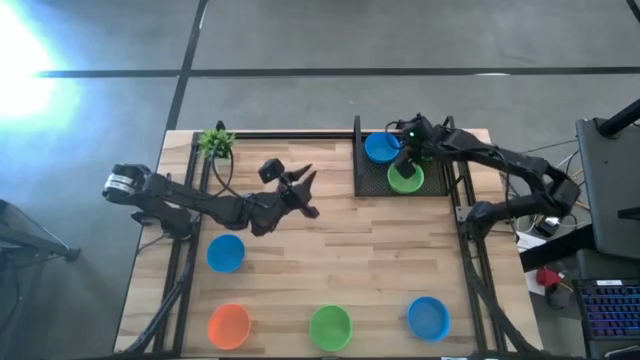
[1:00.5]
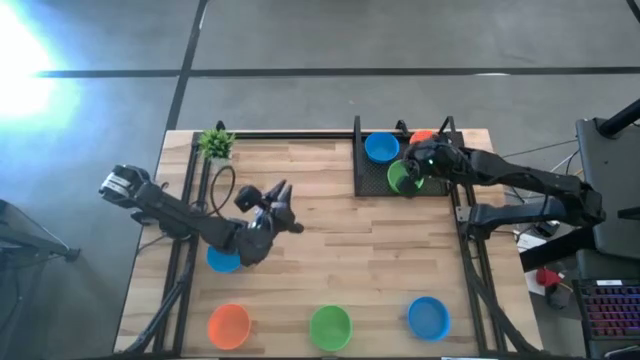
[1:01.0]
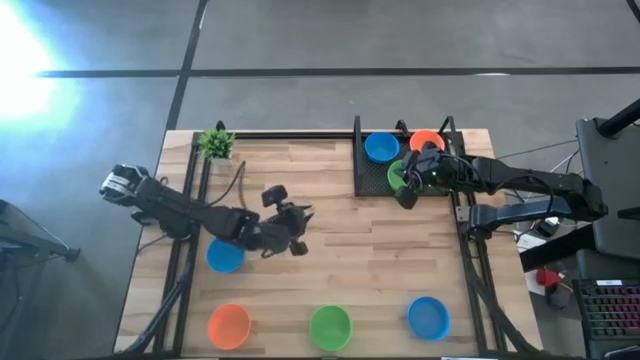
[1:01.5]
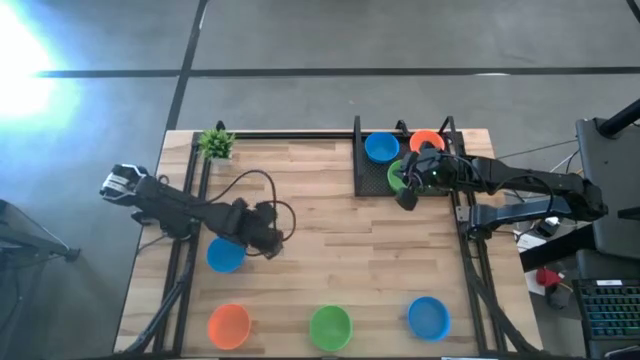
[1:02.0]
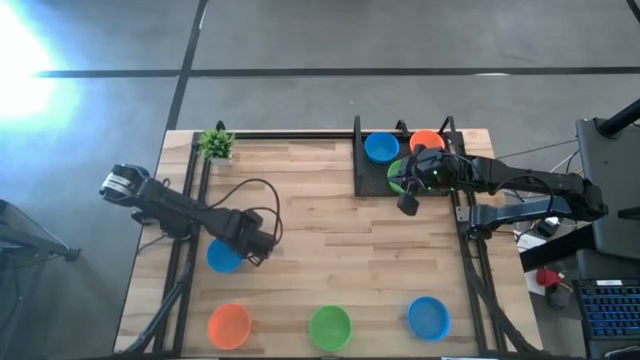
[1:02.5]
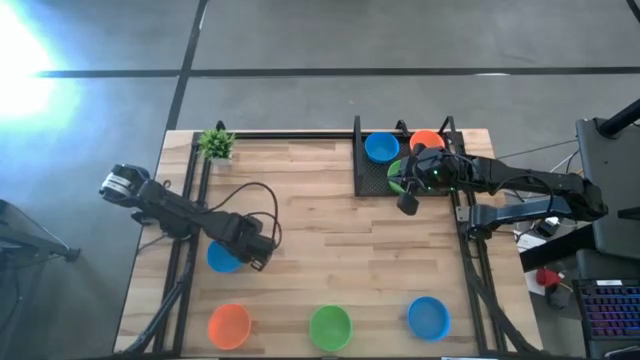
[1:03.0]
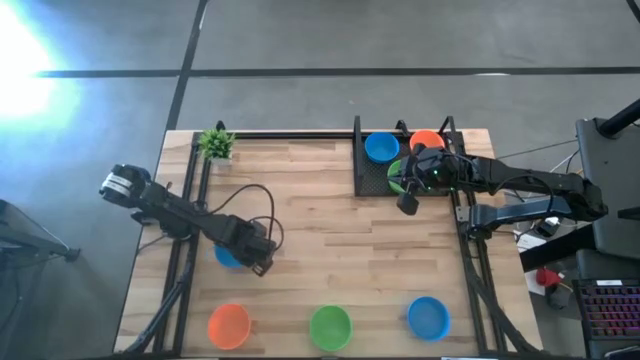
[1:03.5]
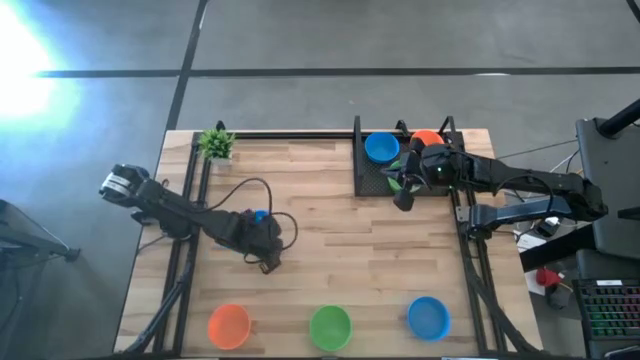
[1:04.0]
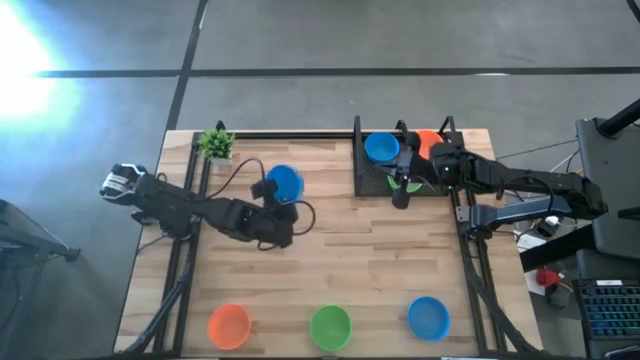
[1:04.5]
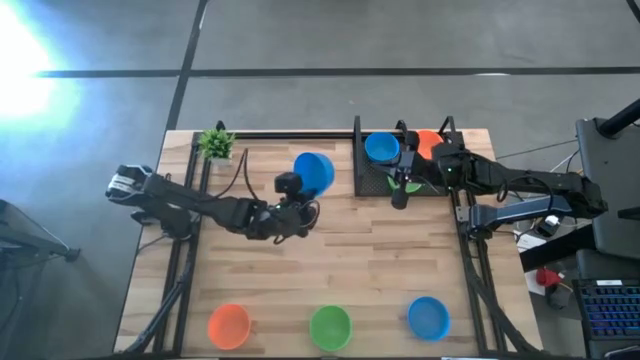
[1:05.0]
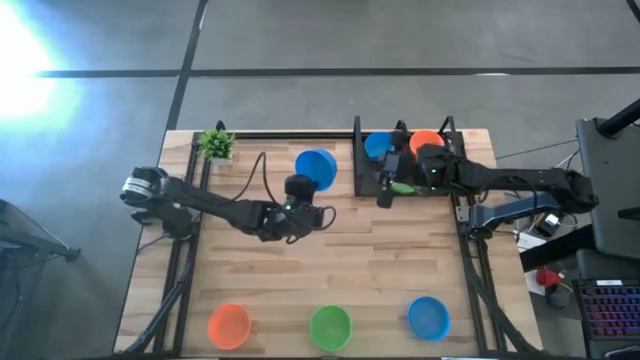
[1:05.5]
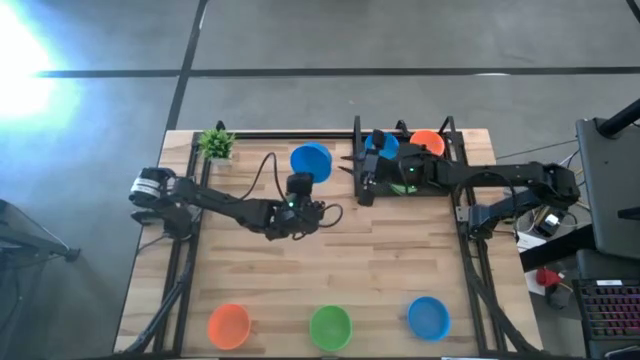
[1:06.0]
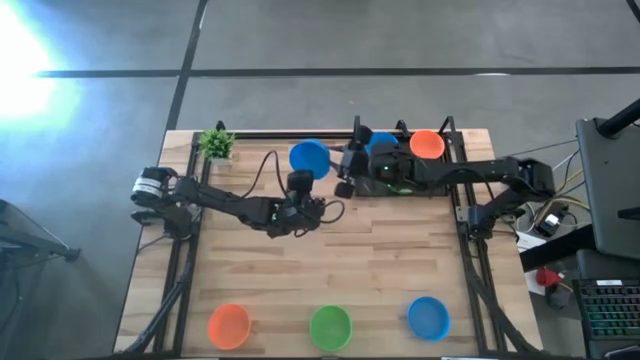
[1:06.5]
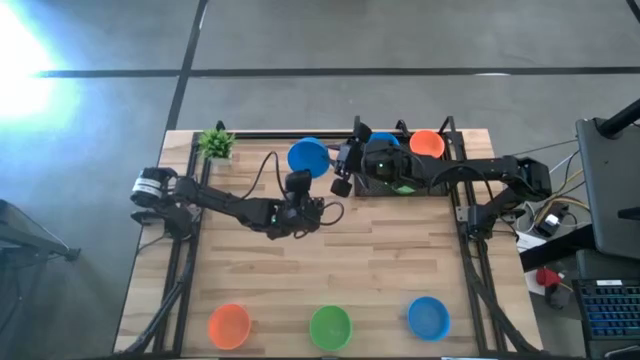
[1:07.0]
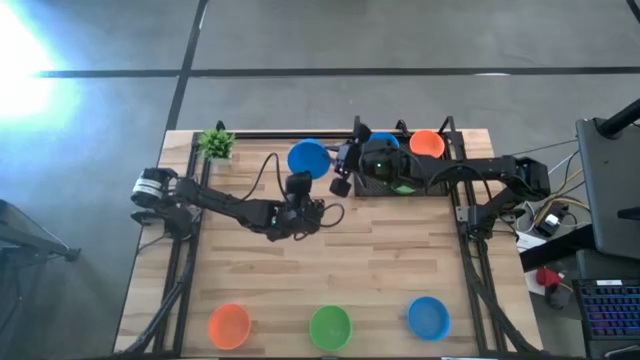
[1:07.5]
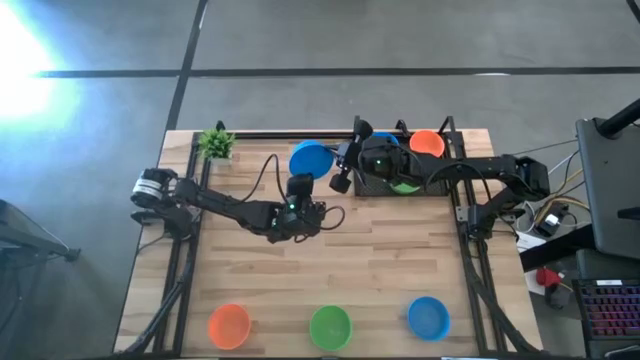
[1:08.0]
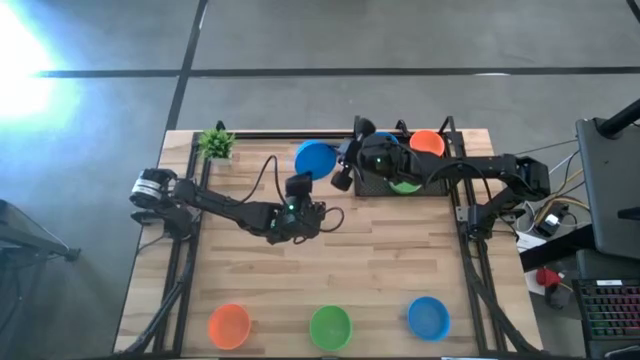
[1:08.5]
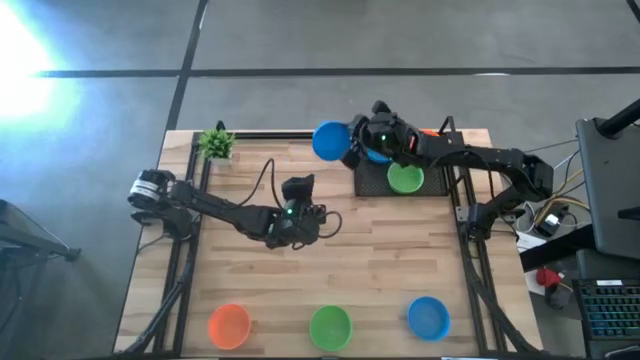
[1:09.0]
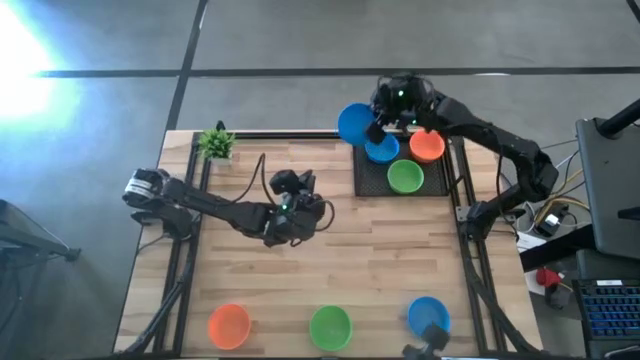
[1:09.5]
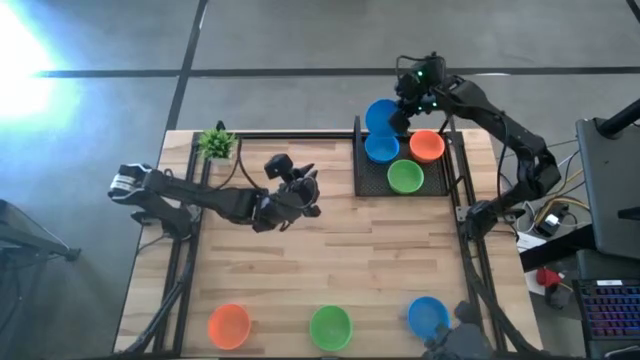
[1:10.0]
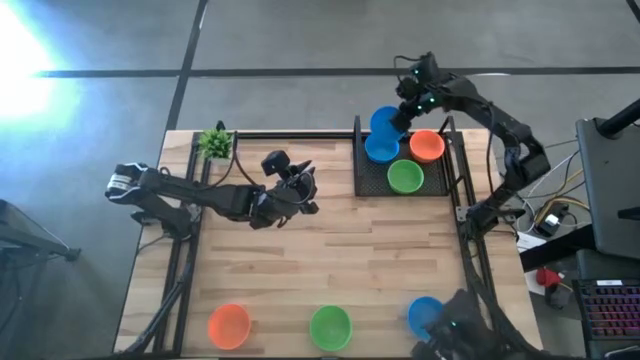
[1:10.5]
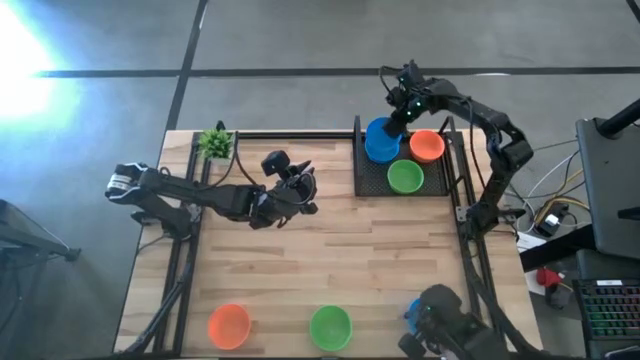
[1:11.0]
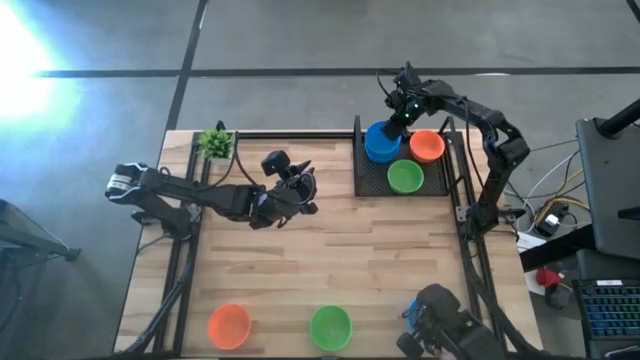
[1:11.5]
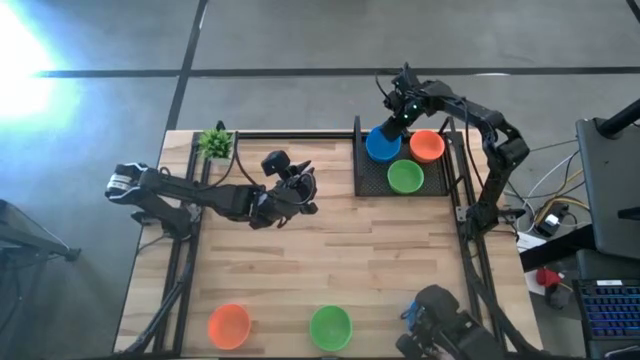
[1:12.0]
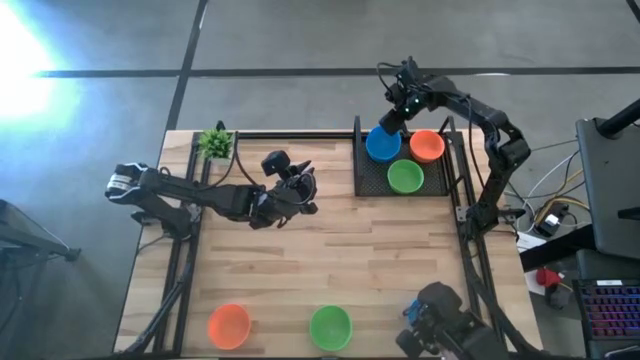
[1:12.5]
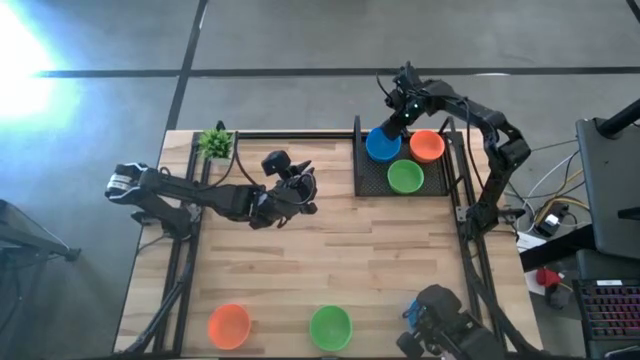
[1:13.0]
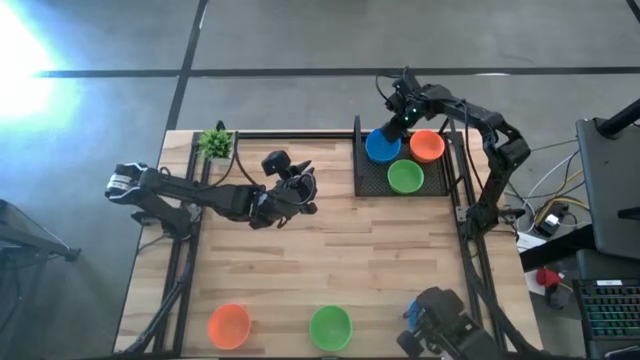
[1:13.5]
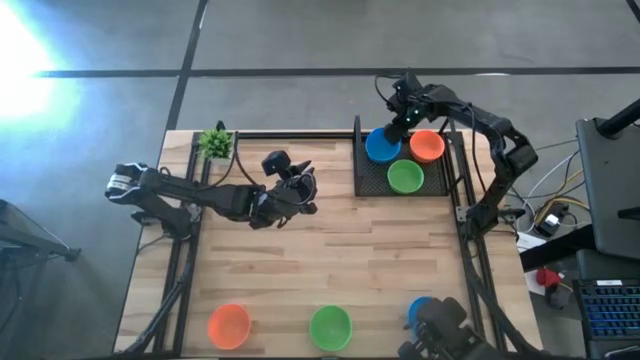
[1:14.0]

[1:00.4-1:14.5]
Task: Pick & Place Mini bowls
Stack the top blue bowl on top of the blue bowl on the shelf

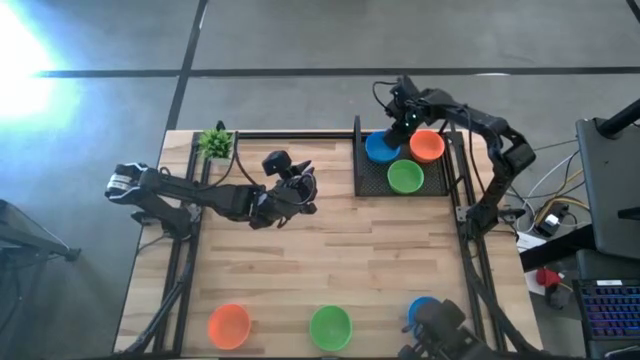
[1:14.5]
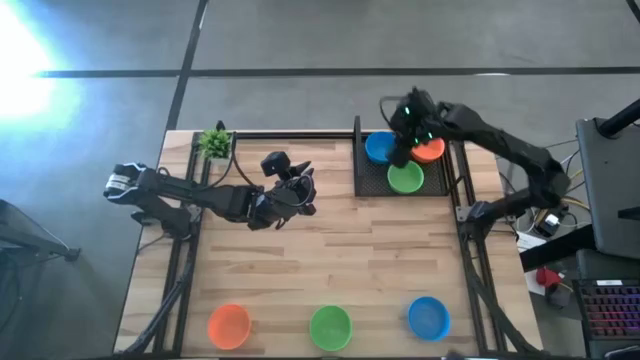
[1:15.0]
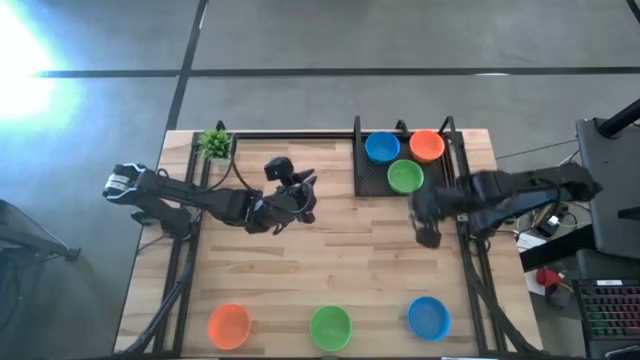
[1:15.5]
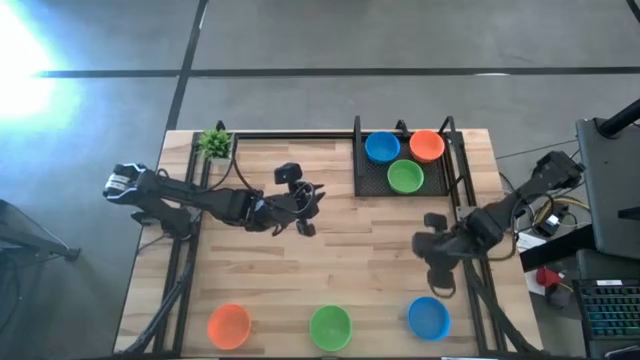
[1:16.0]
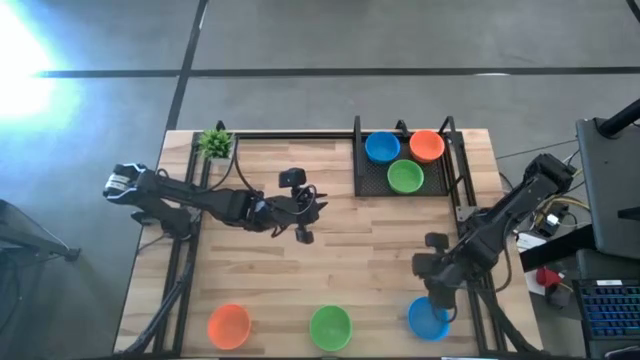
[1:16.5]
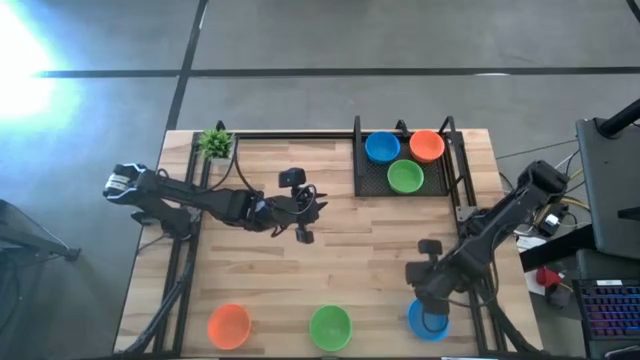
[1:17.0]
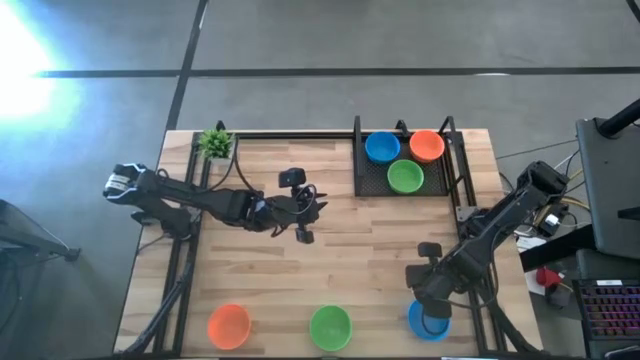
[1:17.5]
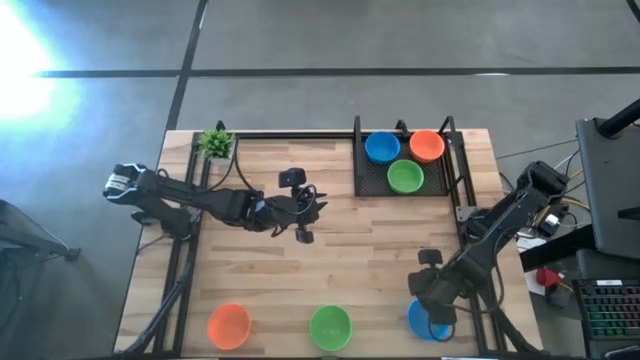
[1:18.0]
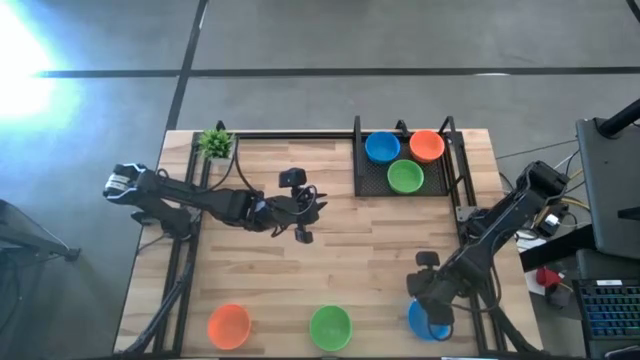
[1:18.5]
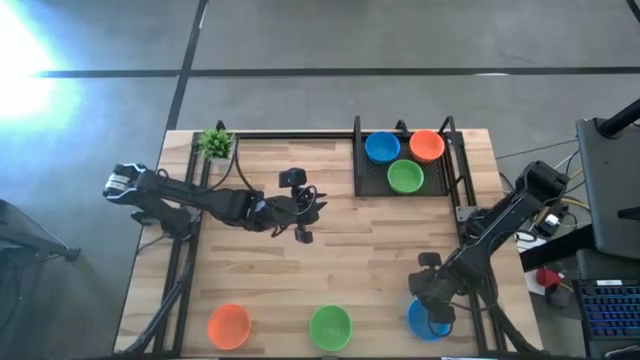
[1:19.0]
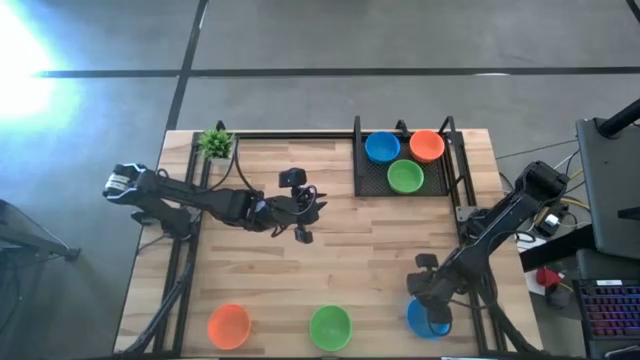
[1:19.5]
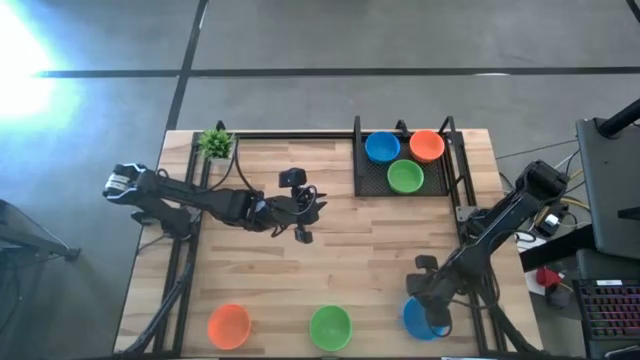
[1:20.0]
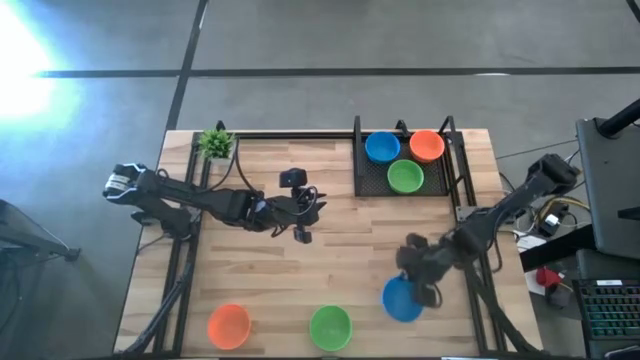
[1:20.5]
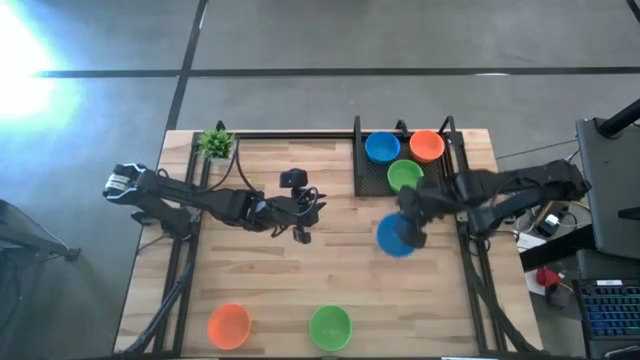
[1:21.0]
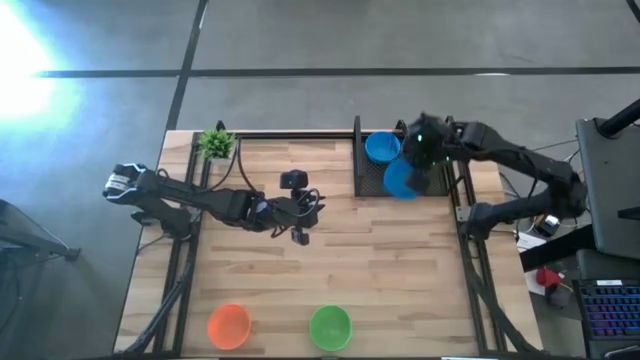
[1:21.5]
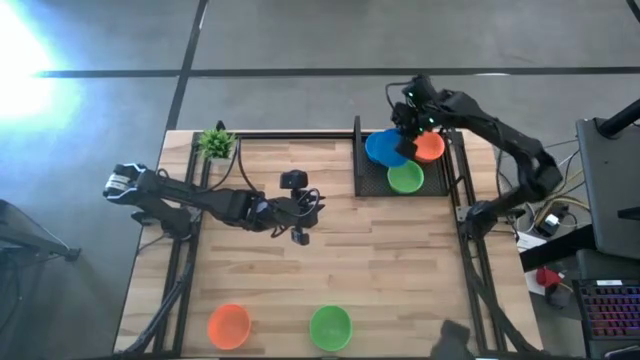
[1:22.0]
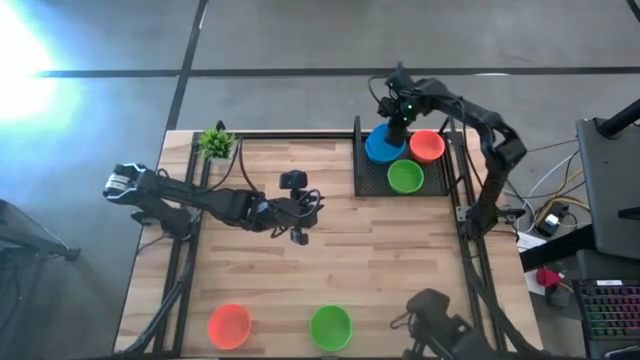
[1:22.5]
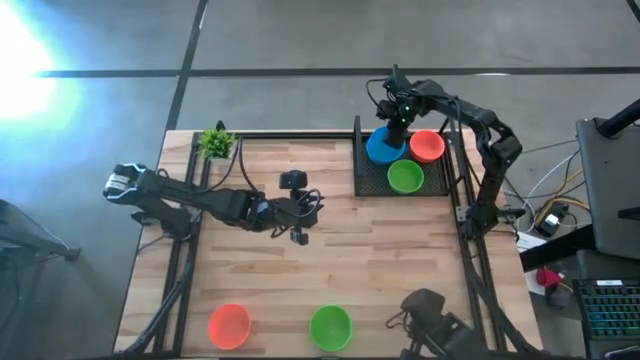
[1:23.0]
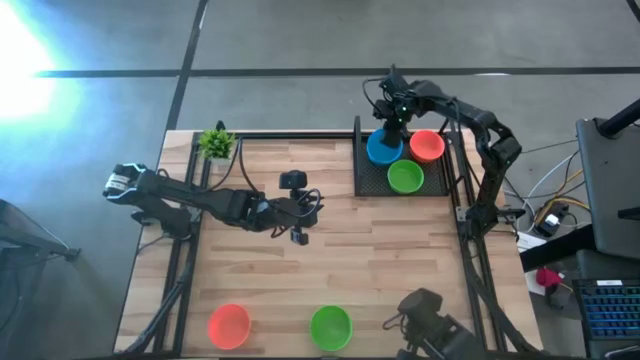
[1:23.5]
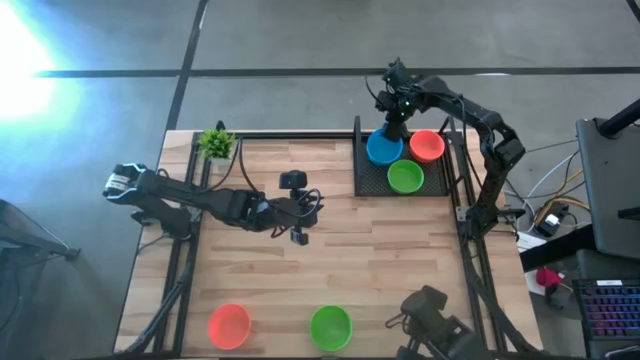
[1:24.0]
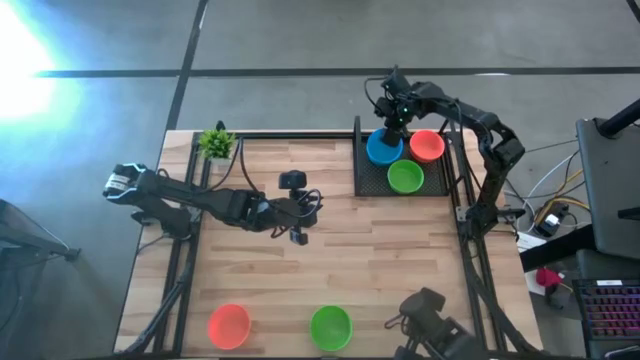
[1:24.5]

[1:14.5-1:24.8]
Stack the blue bowl on top of the blue bowls on the shelf
